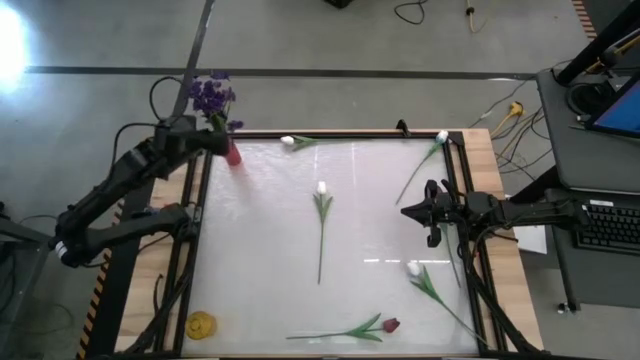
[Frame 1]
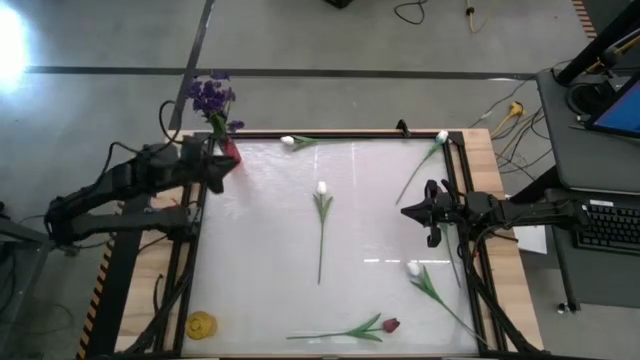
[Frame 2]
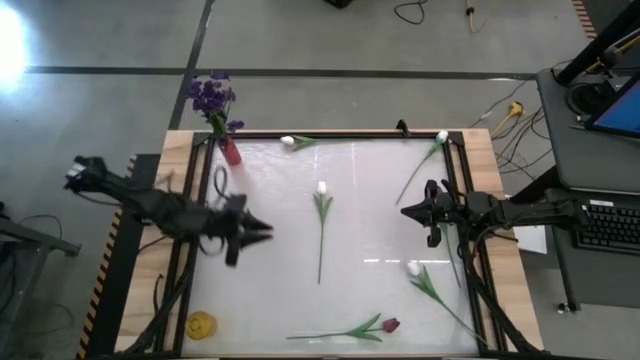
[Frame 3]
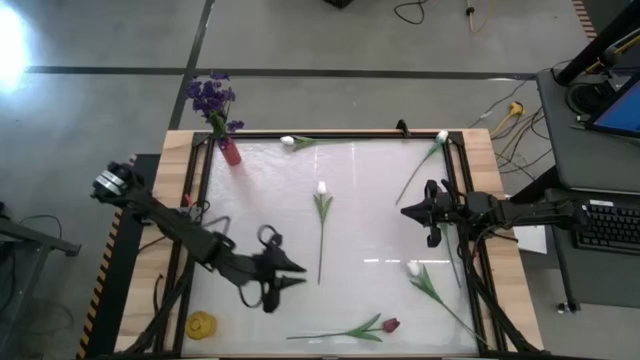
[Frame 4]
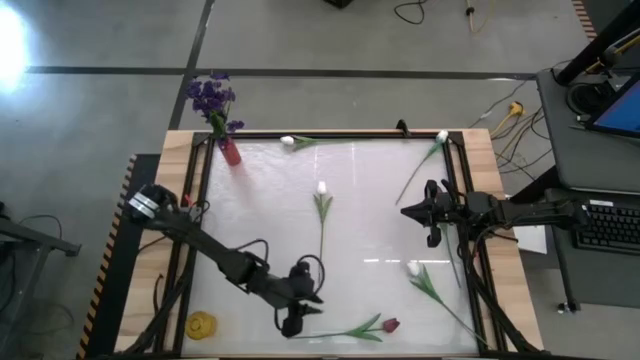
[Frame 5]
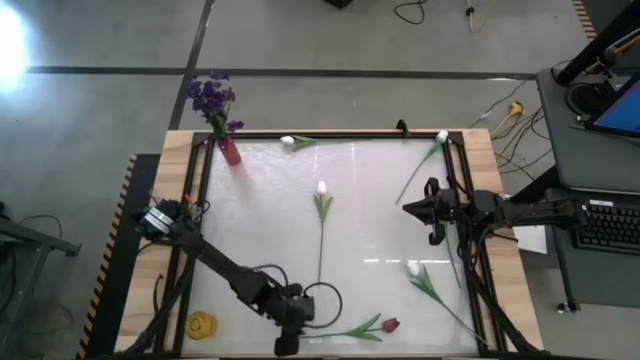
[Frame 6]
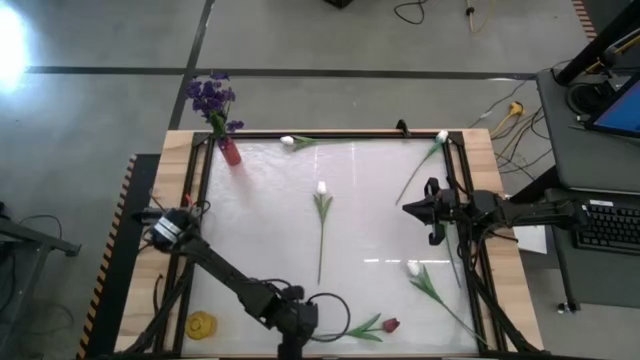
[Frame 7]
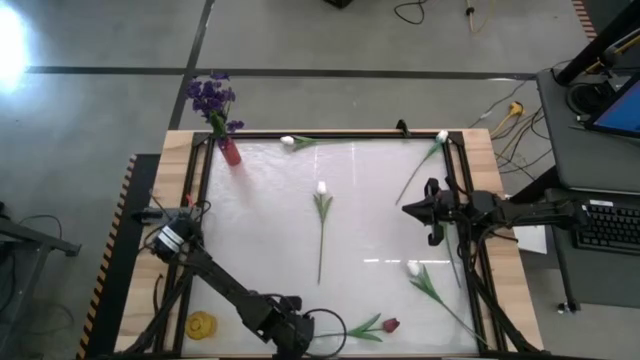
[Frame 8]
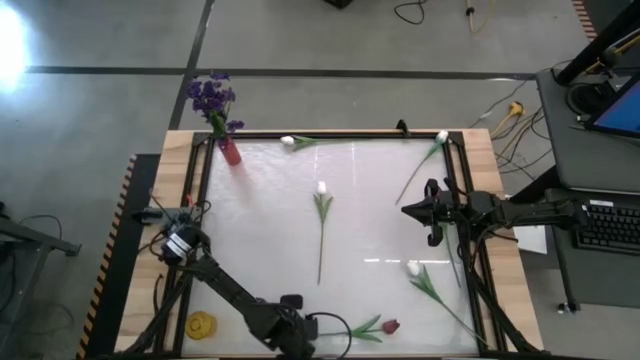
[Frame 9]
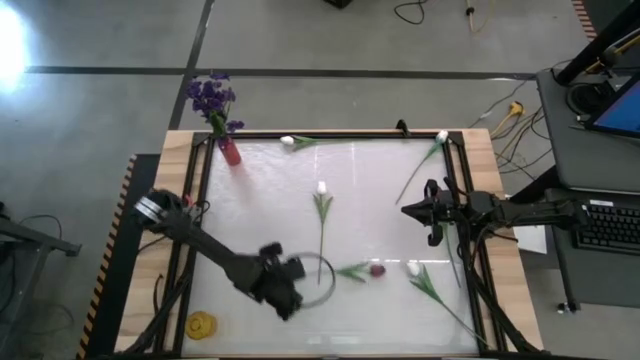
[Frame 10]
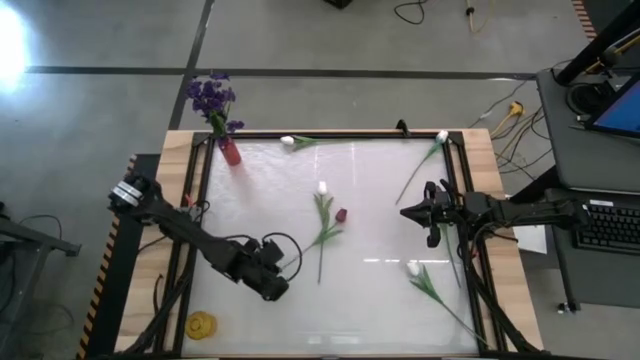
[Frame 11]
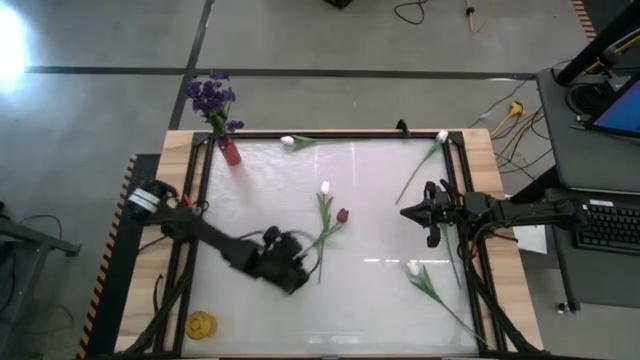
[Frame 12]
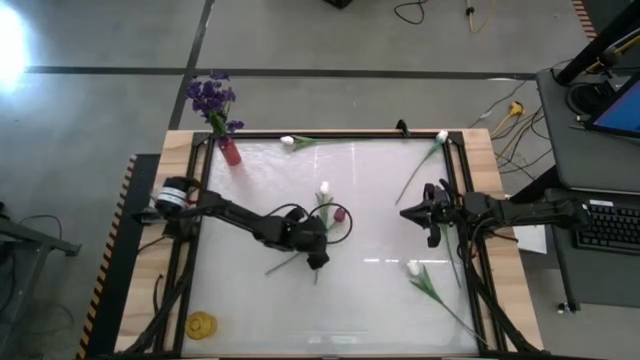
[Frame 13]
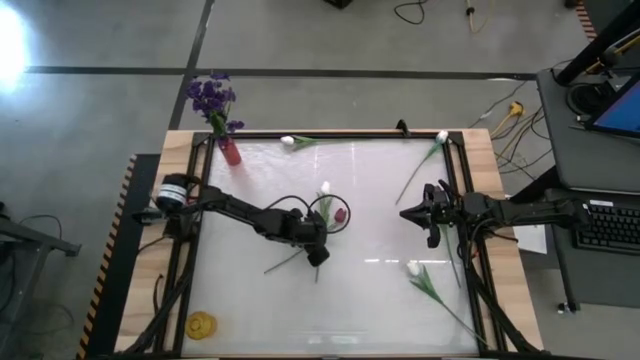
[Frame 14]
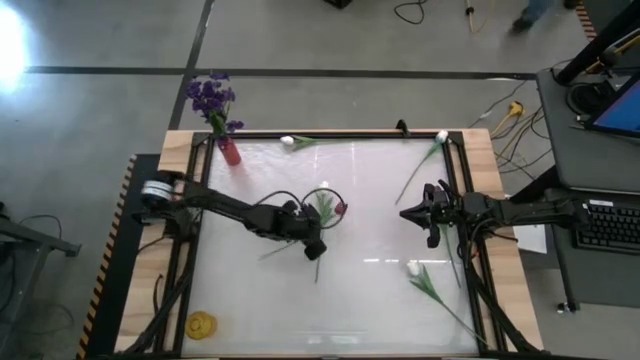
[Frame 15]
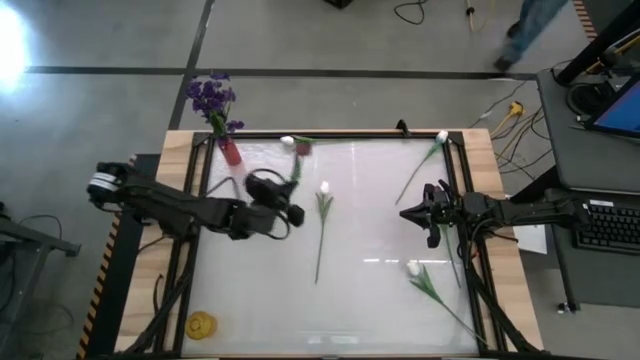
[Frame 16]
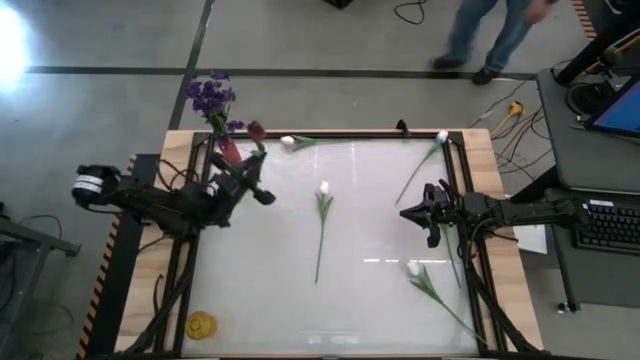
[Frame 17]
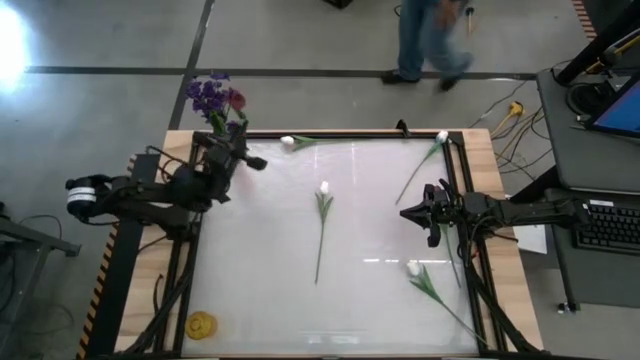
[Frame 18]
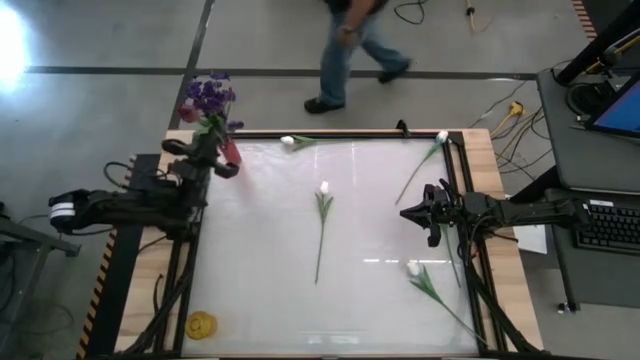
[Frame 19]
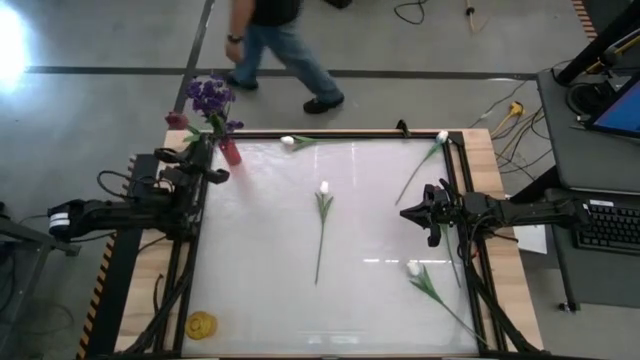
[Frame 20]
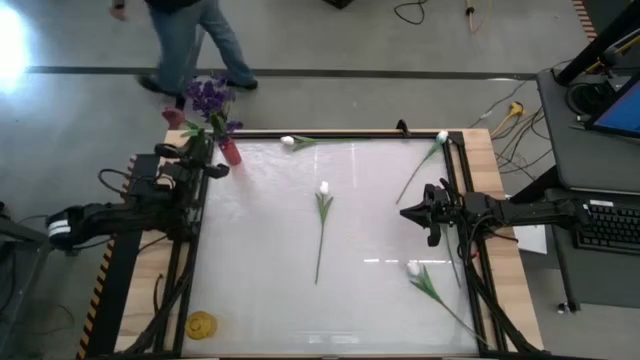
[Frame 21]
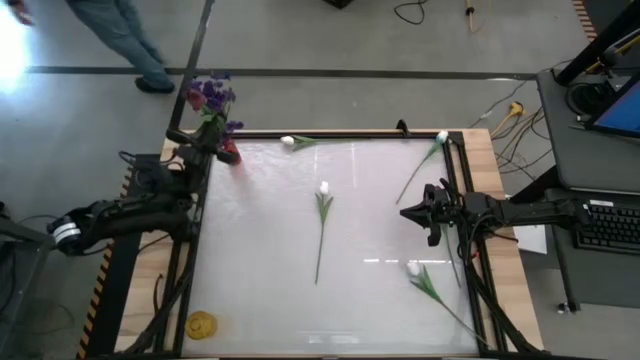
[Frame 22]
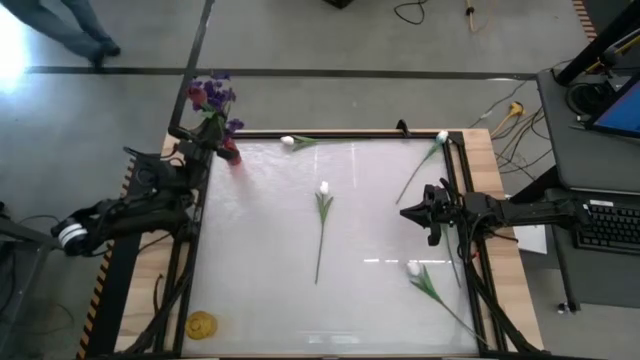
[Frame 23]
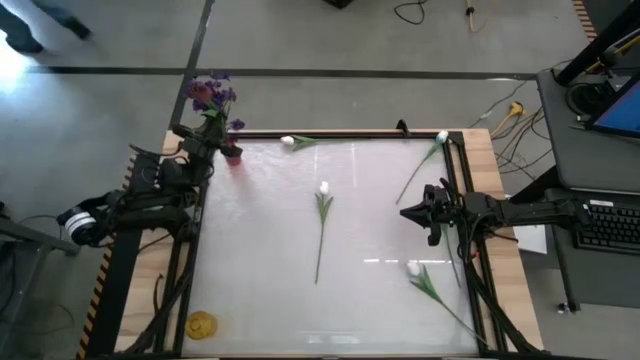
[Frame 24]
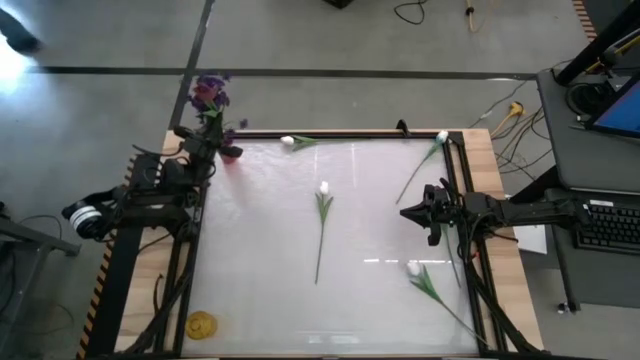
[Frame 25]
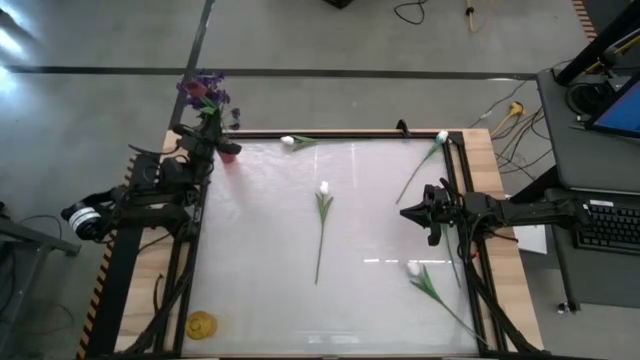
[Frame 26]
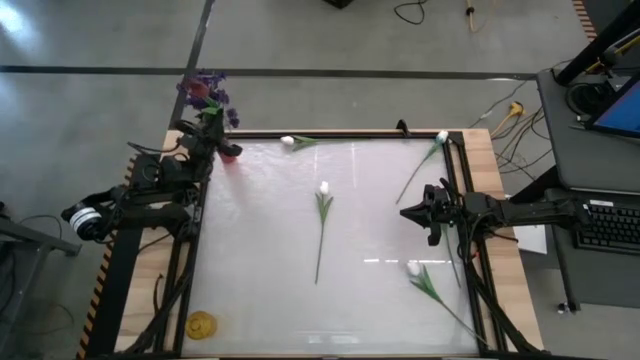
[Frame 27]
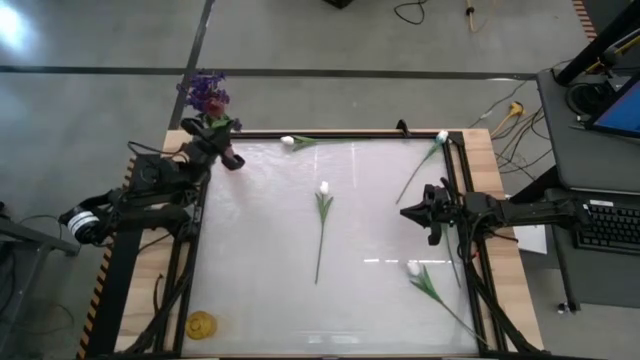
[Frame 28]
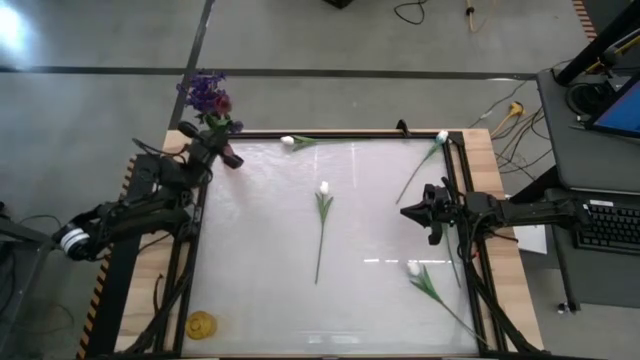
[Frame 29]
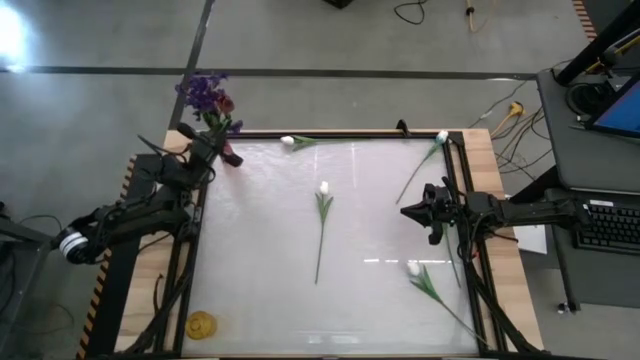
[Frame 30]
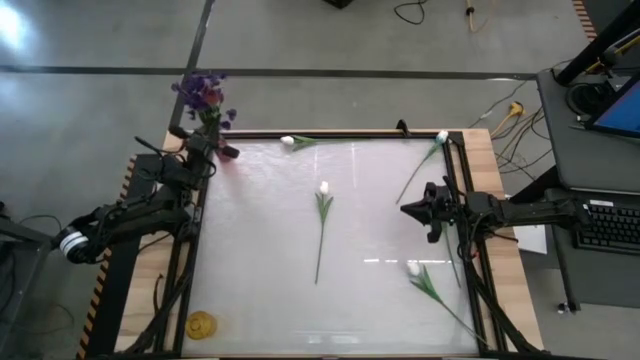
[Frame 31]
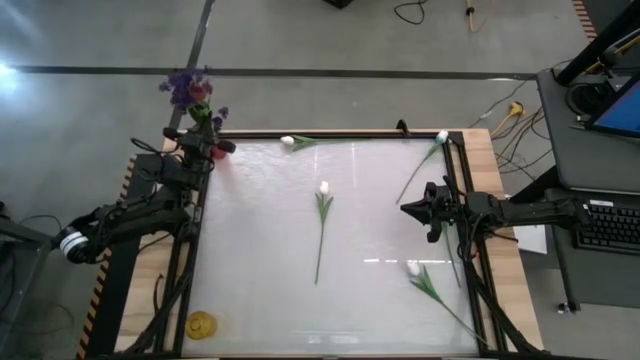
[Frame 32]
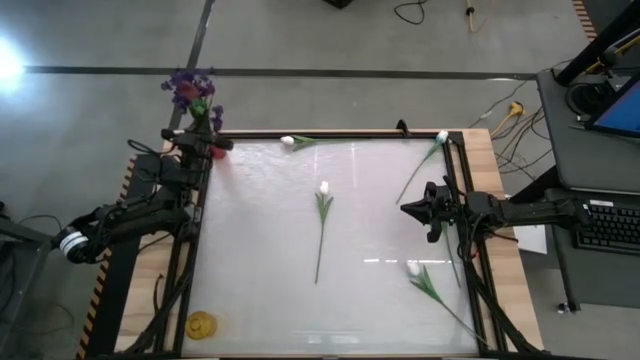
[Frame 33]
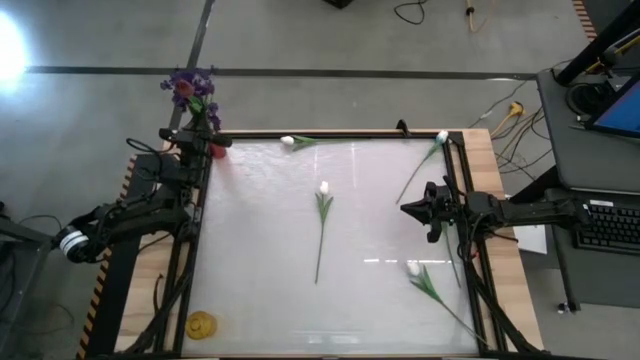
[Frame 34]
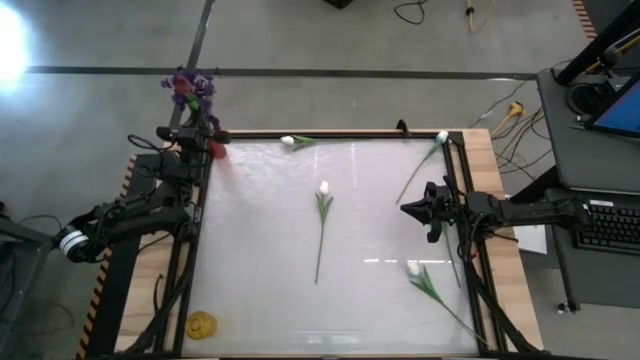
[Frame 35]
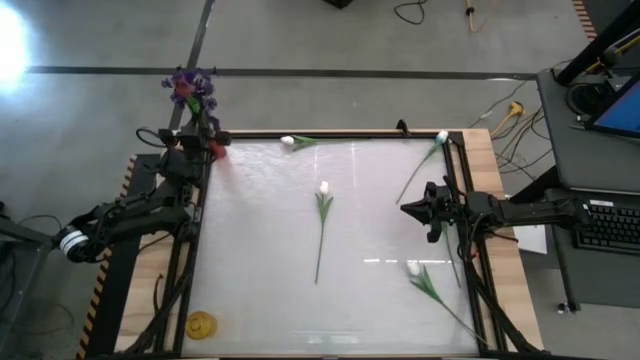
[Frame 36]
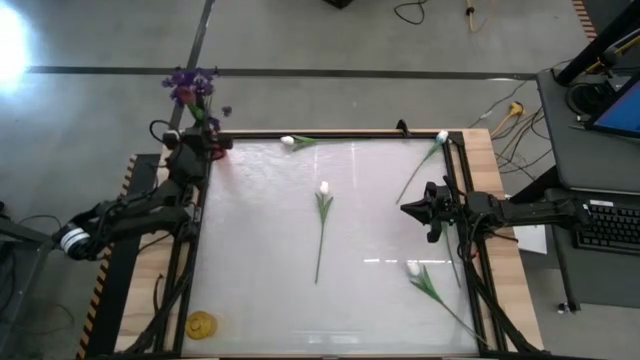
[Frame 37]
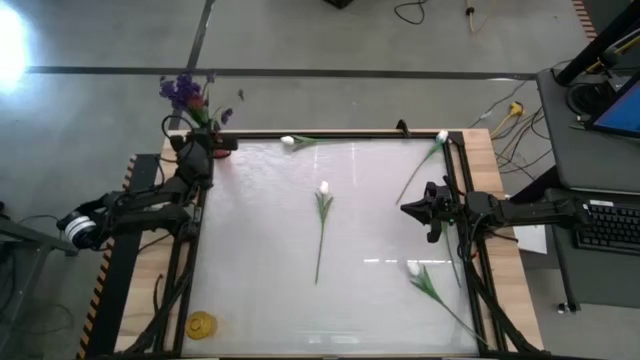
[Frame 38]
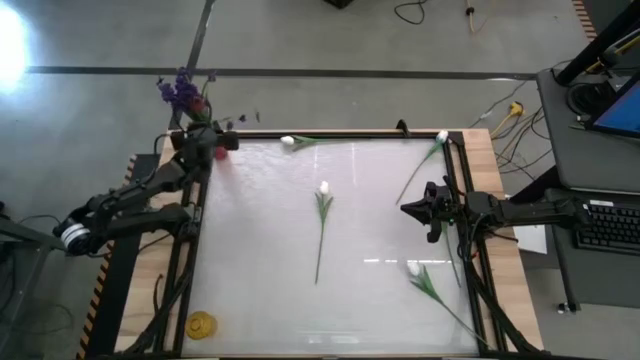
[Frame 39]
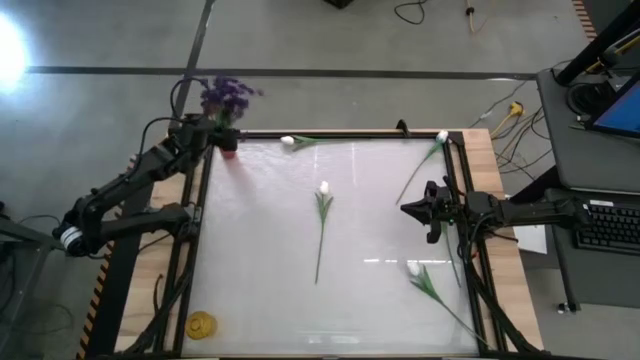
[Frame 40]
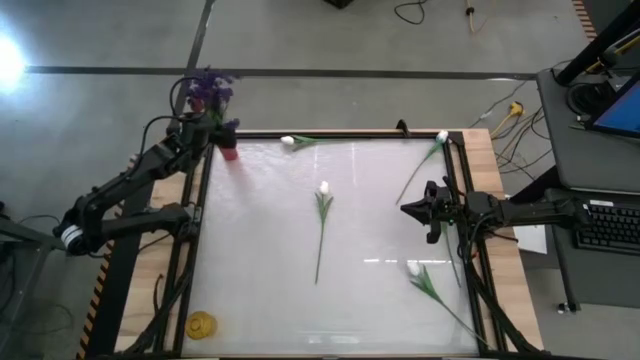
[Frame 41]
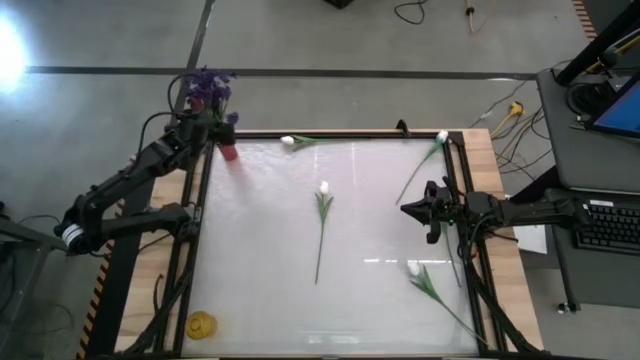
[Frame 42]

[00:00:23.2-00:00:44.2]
Task: Sort flowers into vase by color
Put the bottom red flower into the red vase
